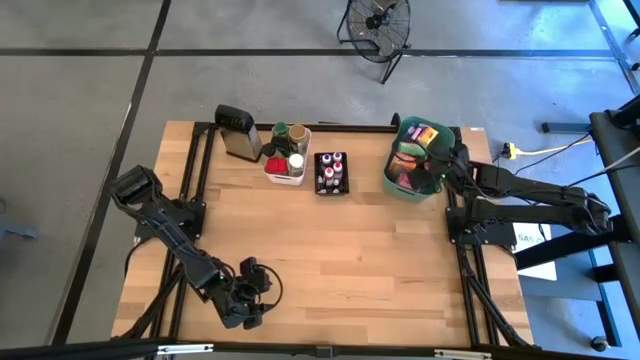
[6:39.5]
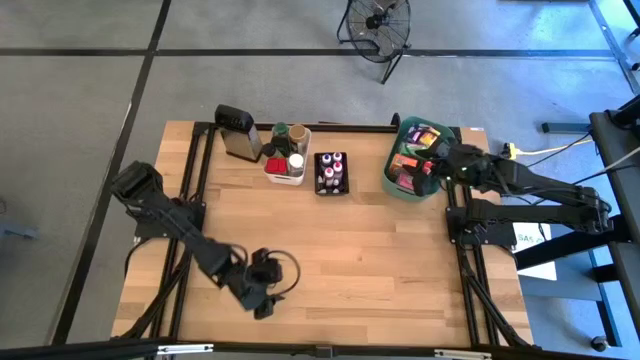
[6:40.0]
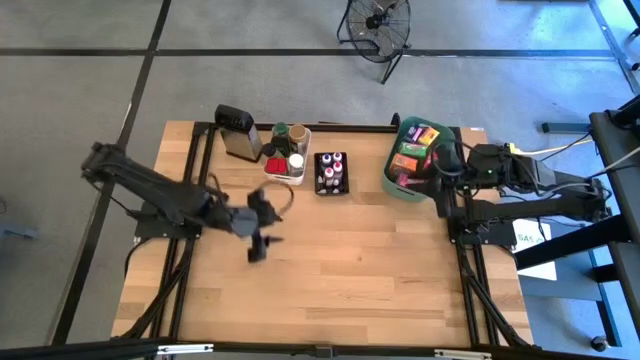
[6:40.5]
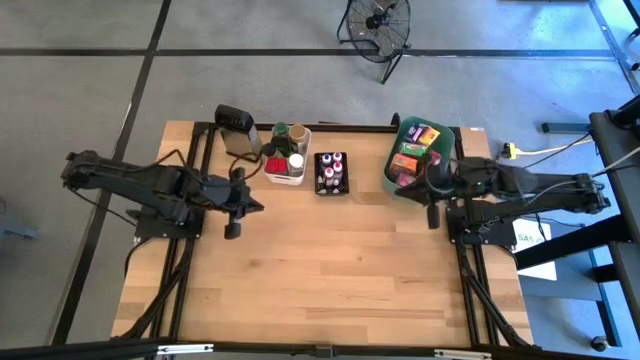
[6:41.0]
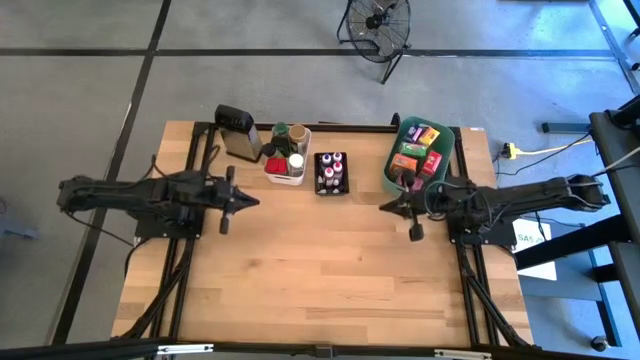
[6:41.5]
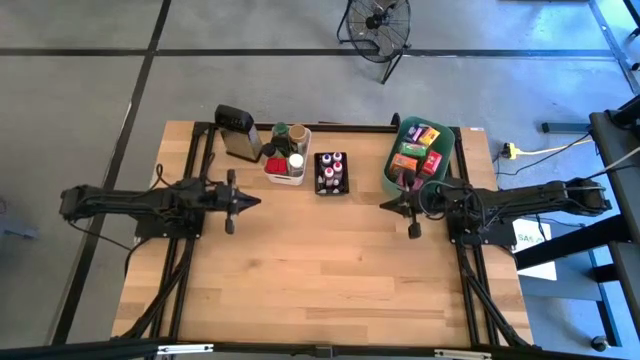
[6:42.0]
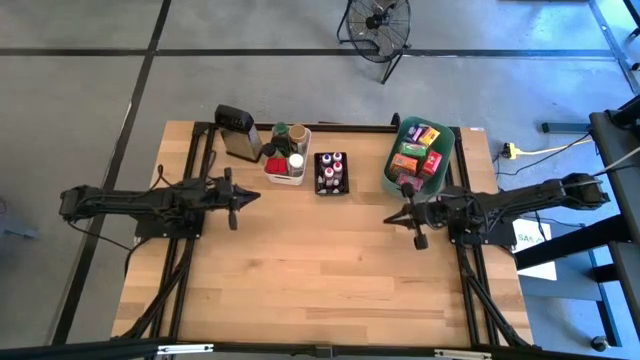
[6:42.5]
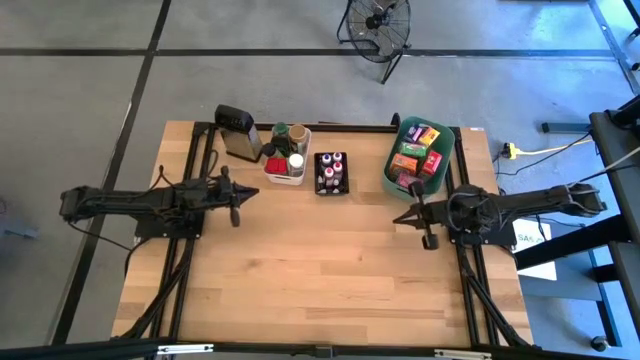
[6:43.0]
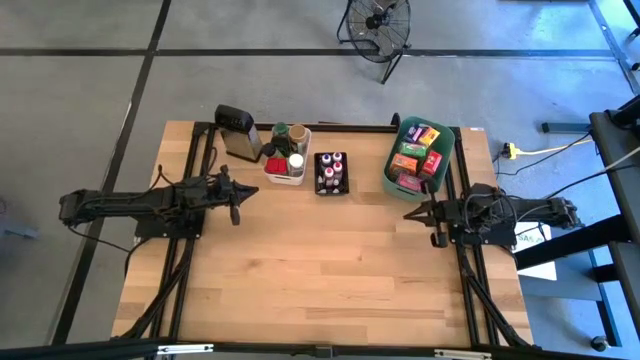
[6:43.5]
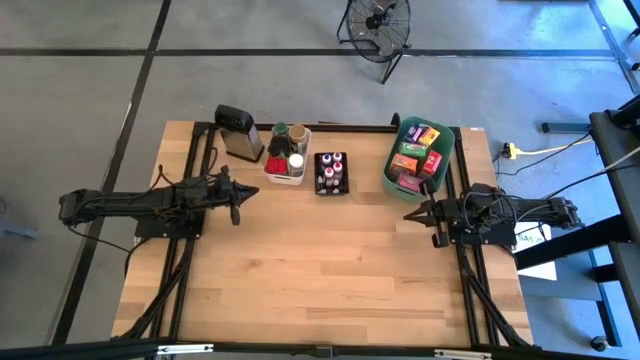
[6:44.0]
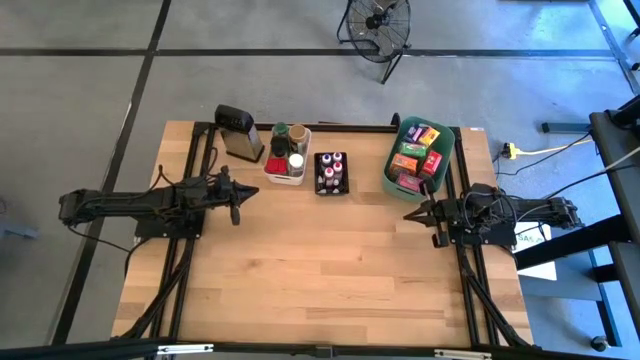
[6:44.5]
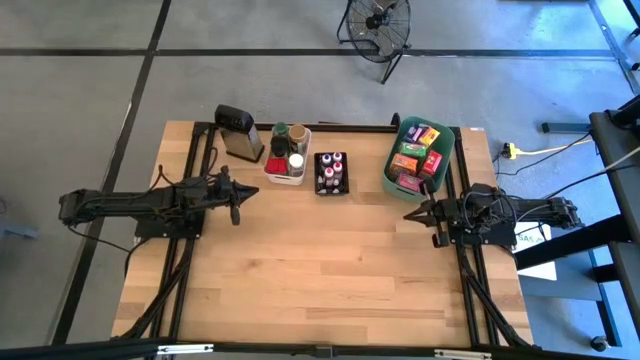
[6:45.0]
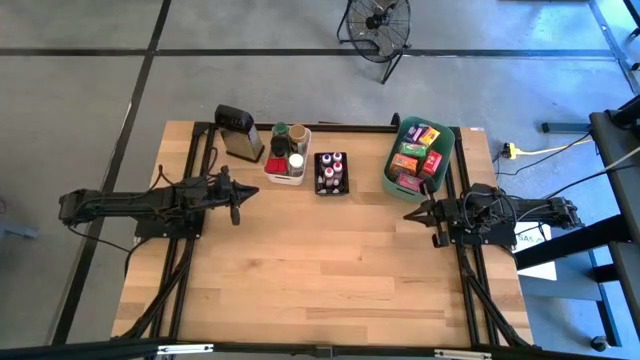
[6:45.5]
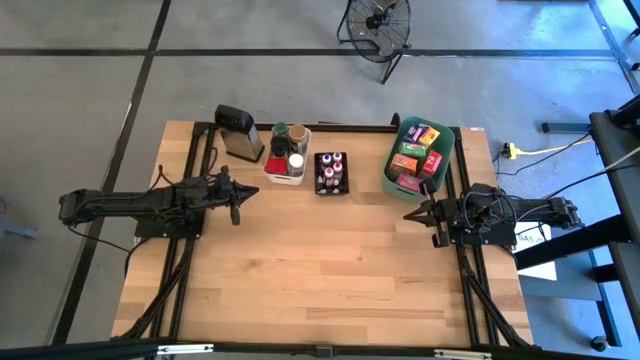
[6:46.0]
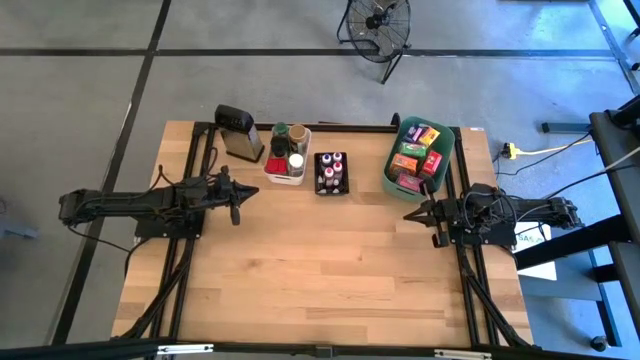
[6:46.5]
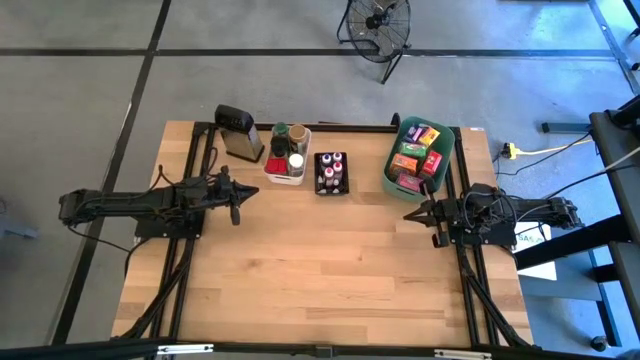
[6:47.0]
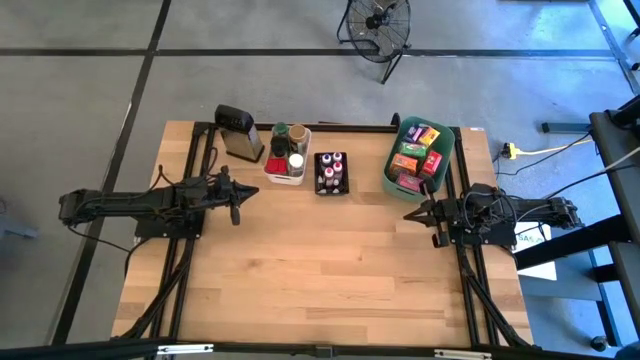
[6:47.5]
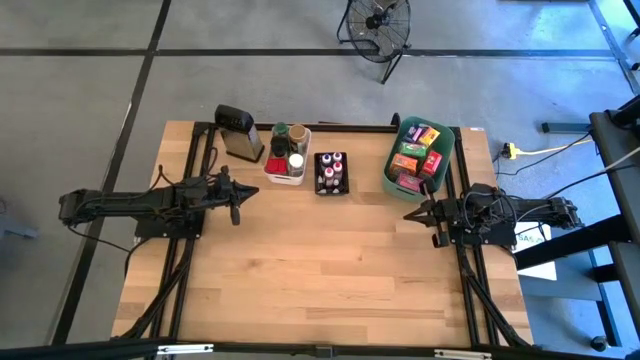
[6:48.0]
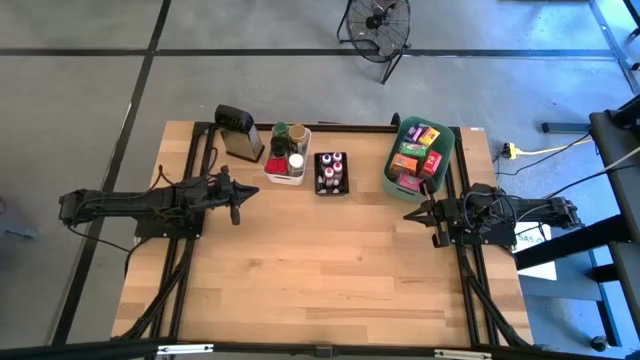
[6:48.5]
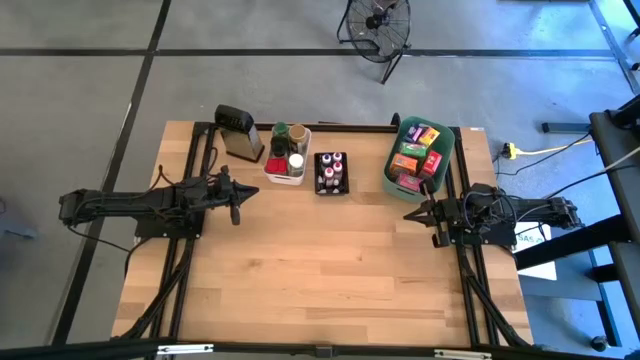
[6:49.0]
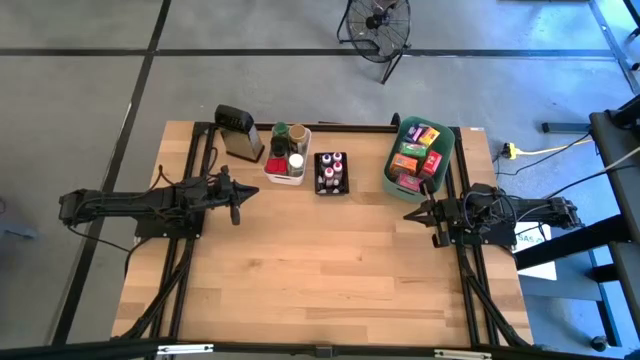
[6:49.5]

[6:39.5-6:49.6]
Task: Pick & Place Kitchen Items
Return to Home Position

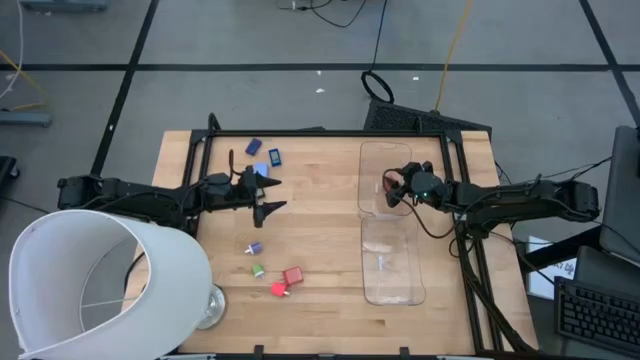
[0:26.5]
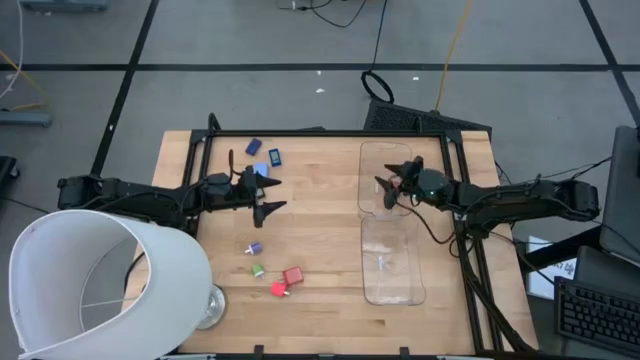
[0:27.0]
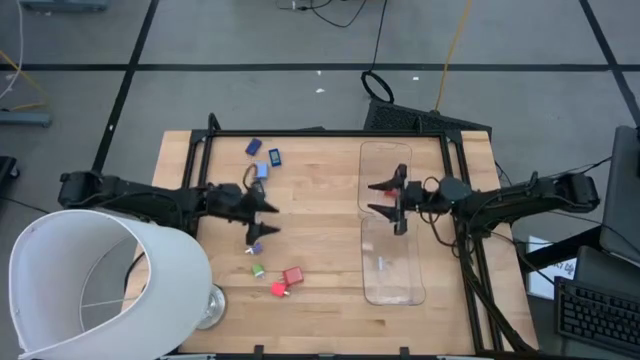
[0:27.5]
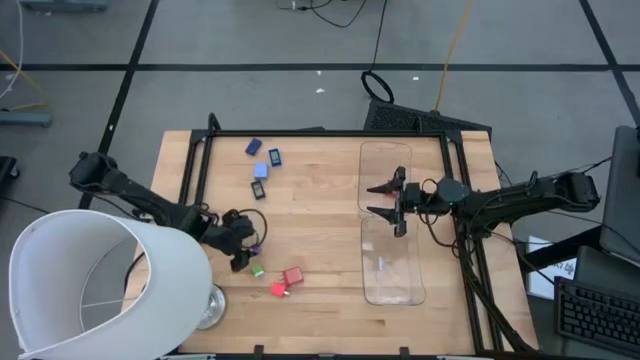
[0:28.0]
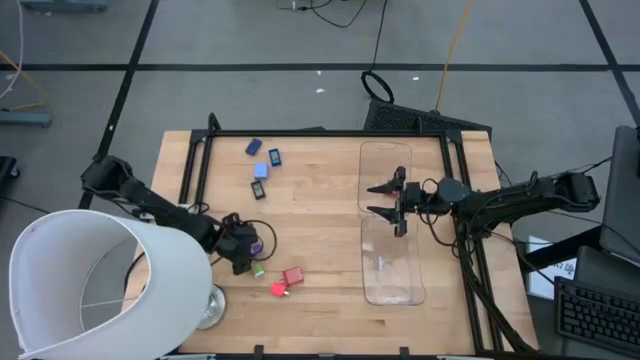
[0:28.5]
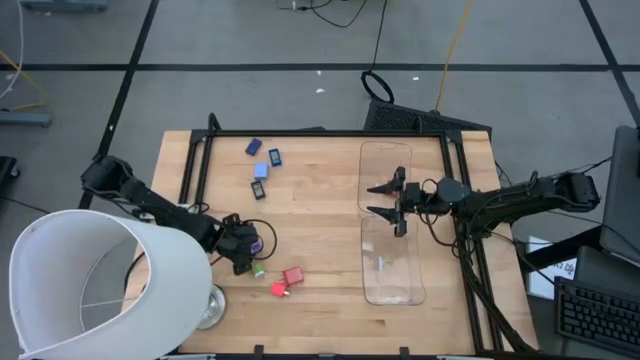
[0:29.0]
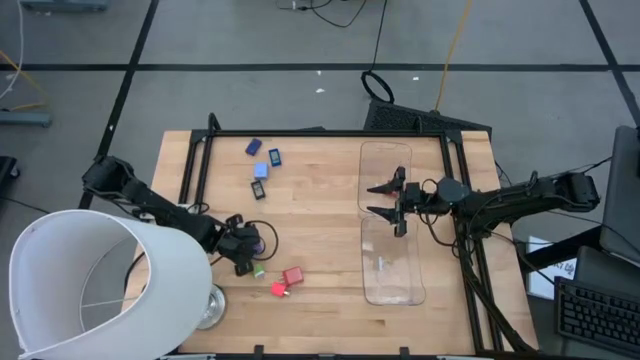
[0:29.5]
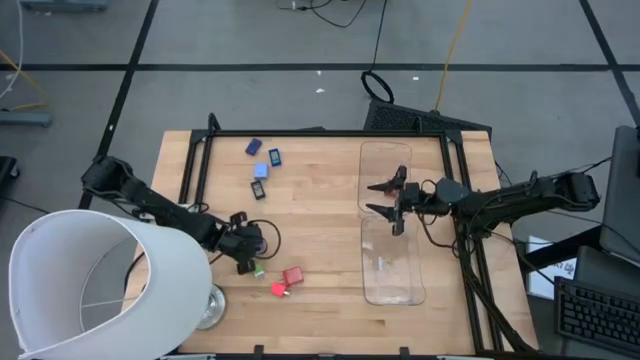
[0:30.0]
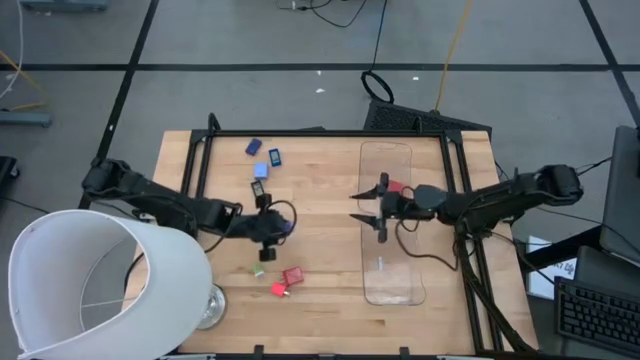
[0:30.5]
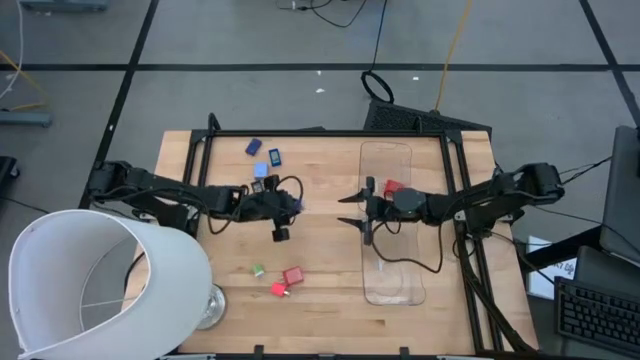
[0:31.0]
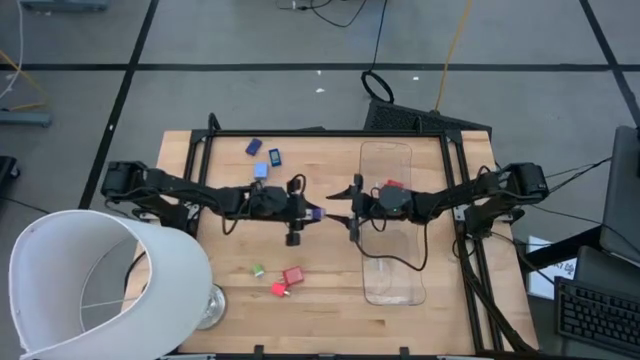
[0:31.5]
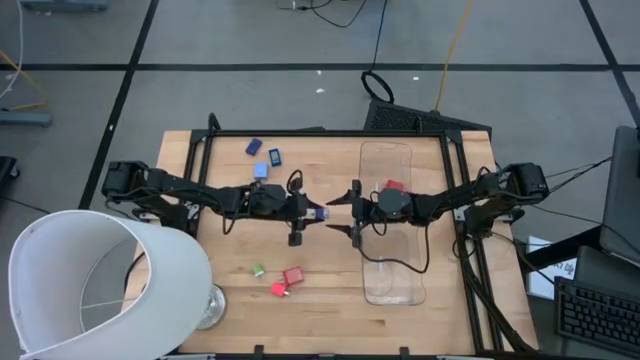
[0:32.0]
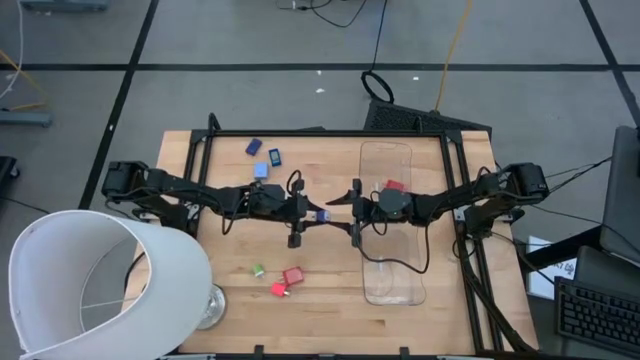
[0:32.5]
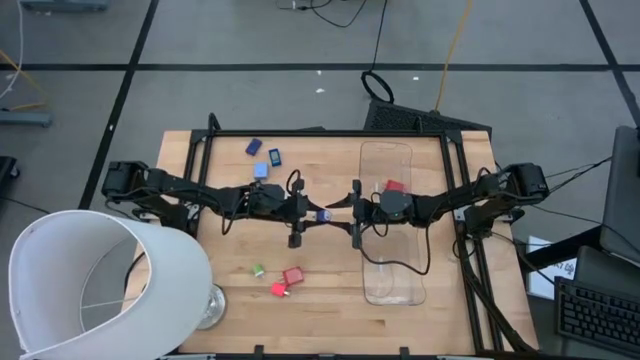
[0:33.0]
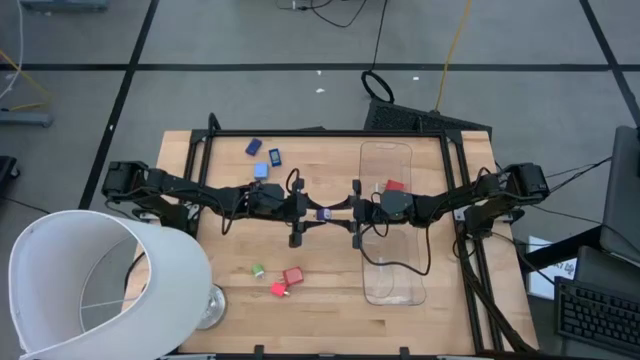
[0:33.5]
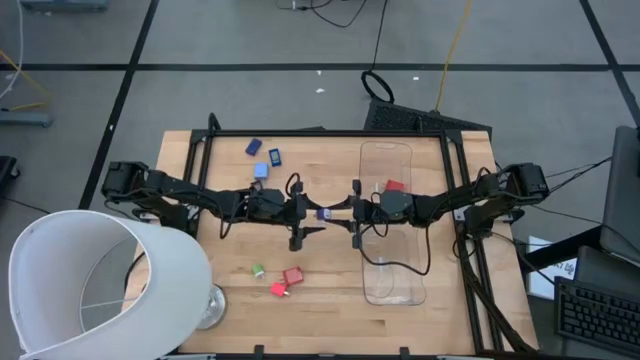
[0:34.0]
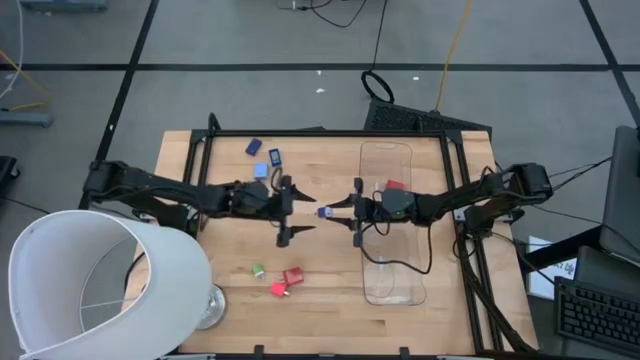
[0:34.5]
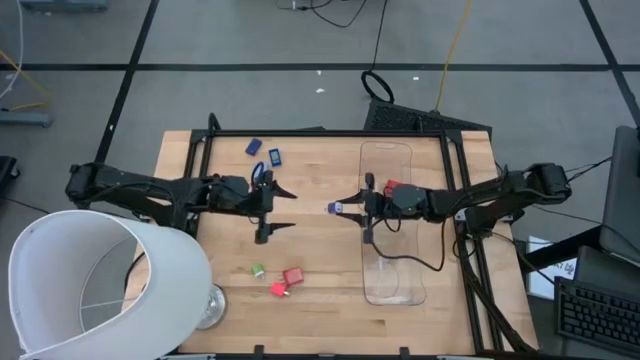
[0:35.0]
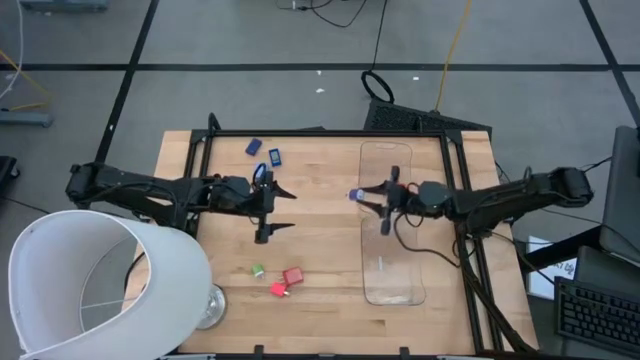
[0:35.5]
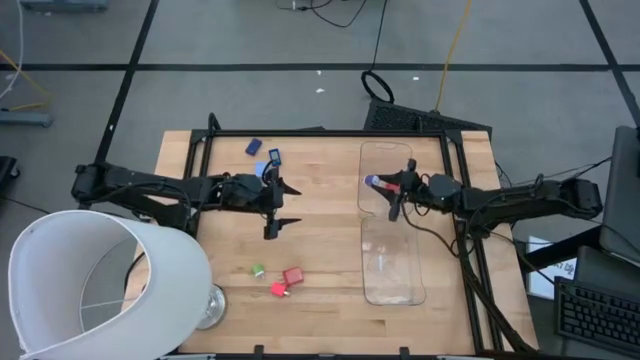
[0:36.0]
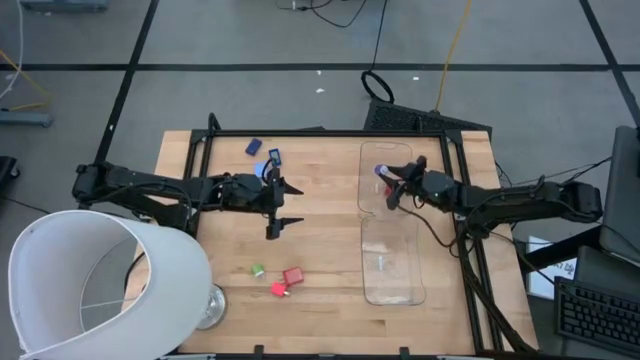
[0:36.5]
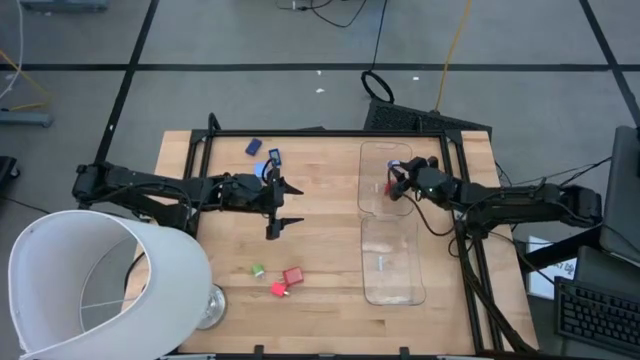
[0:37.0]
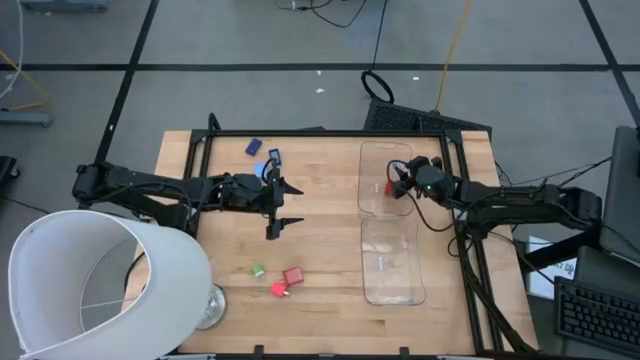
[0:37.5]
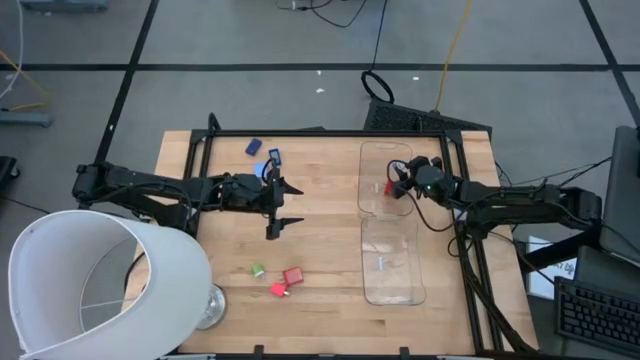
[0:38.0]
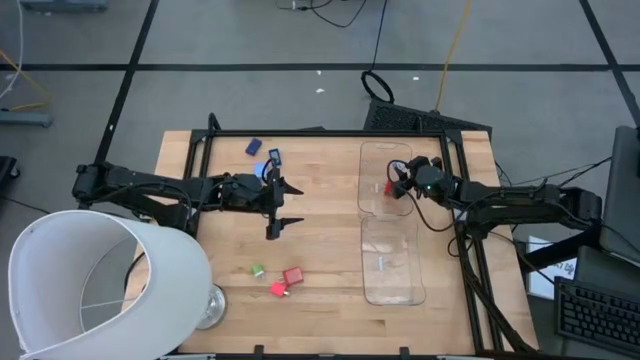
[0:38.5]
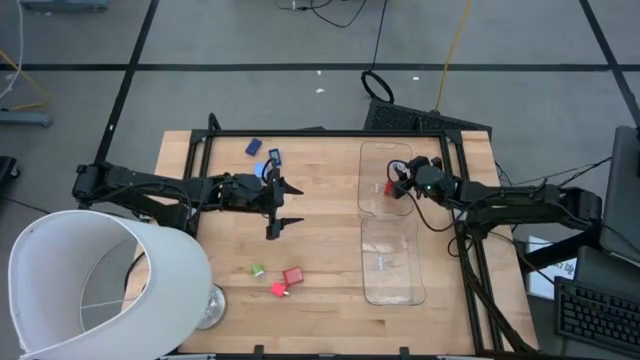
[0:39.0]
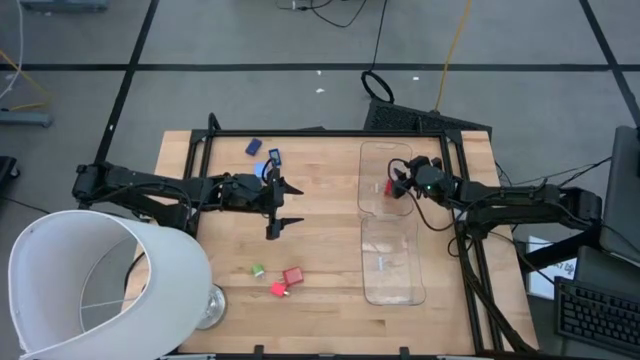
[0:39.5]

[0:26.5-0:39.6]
Task: Pick & Place Office items
Put the dark blue charger adapter into the top transparent bin
